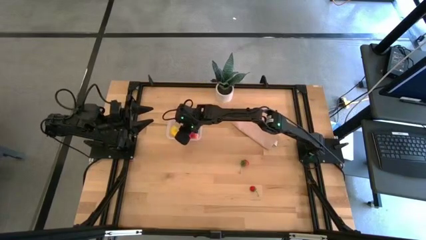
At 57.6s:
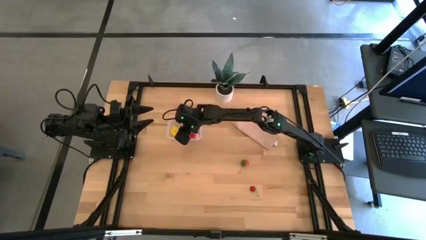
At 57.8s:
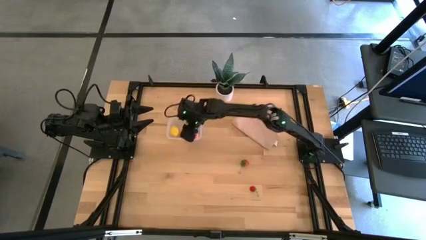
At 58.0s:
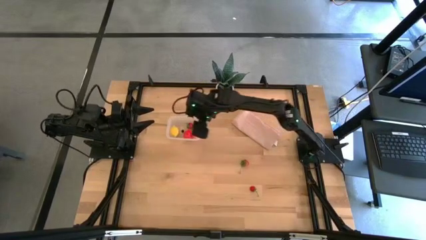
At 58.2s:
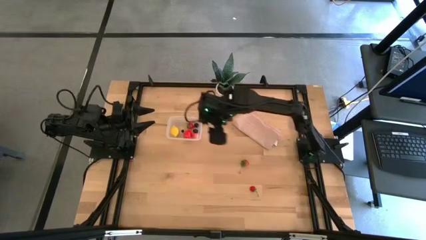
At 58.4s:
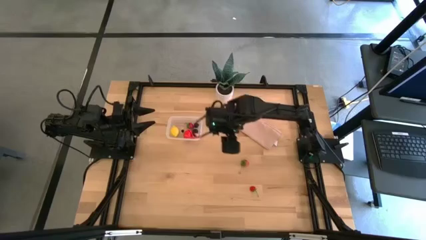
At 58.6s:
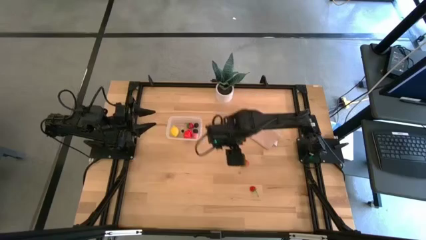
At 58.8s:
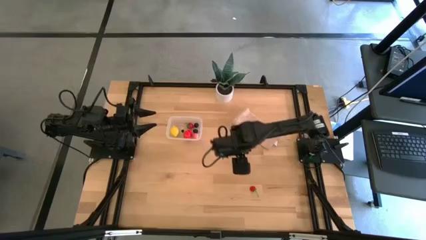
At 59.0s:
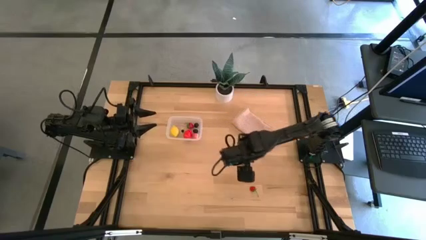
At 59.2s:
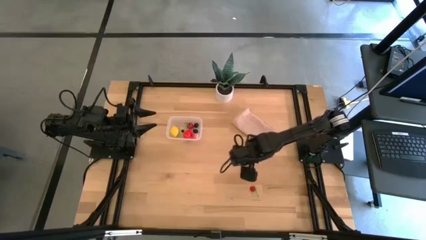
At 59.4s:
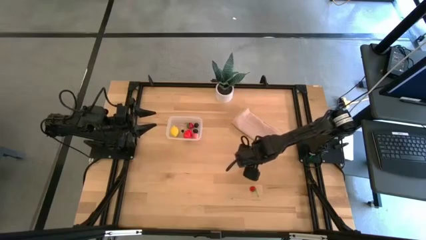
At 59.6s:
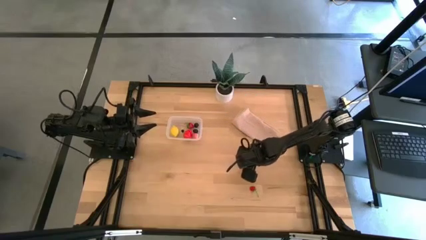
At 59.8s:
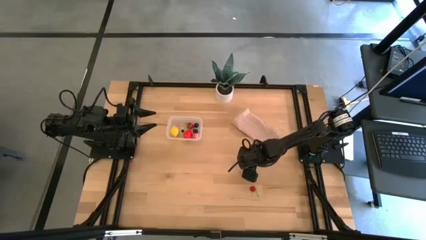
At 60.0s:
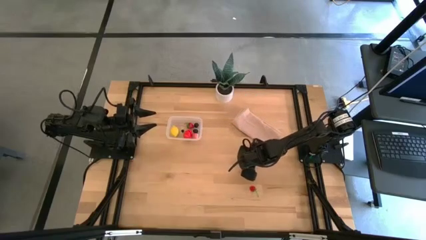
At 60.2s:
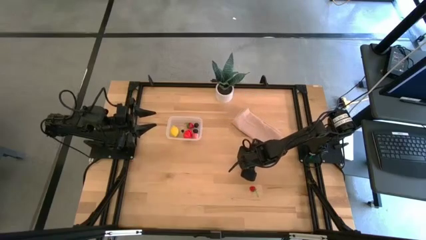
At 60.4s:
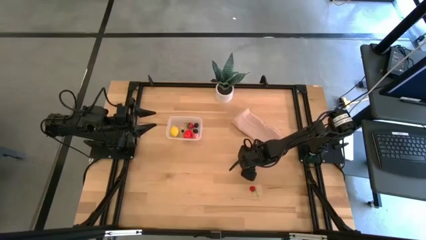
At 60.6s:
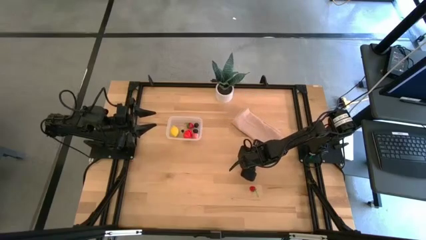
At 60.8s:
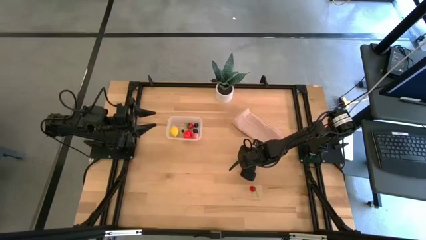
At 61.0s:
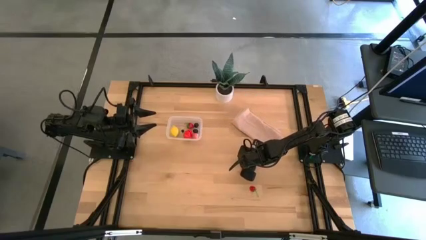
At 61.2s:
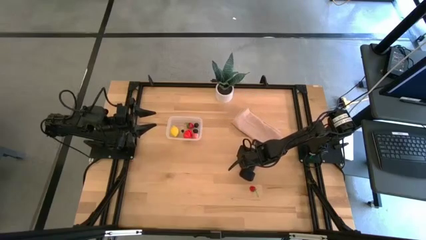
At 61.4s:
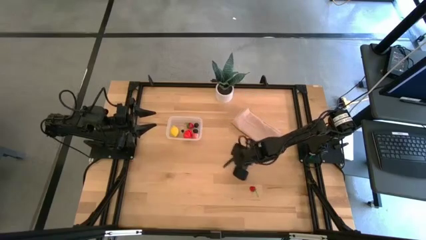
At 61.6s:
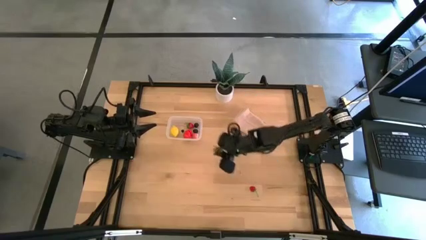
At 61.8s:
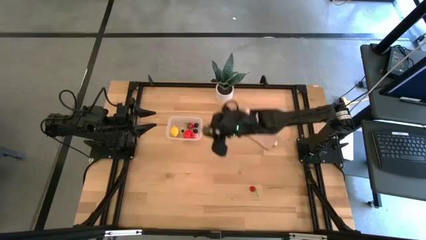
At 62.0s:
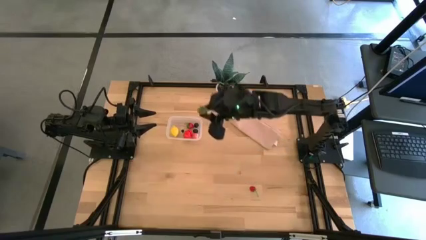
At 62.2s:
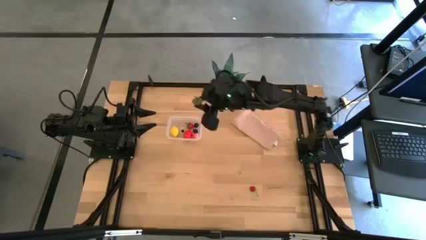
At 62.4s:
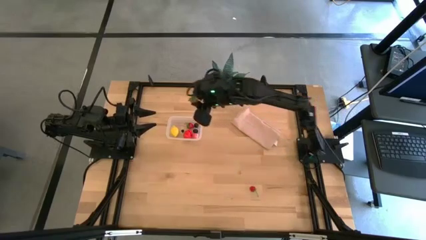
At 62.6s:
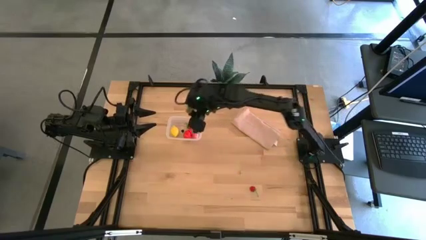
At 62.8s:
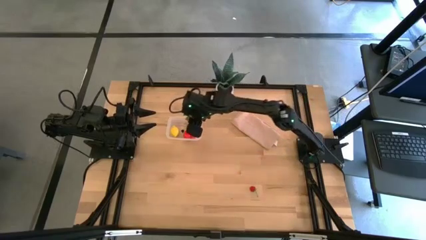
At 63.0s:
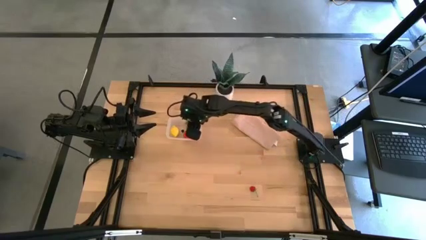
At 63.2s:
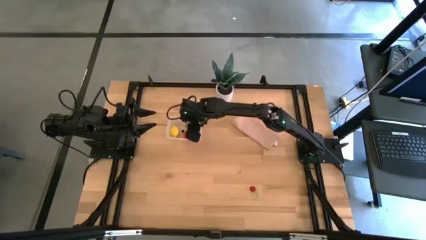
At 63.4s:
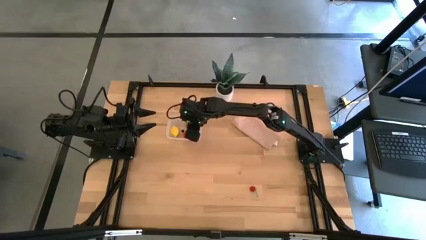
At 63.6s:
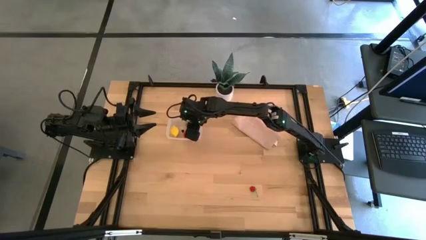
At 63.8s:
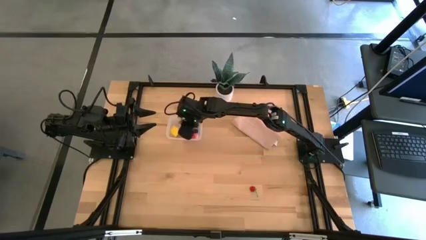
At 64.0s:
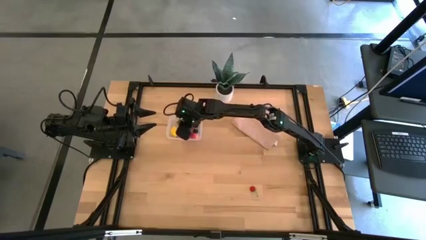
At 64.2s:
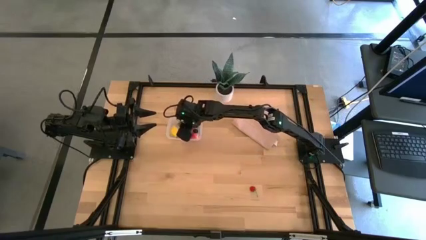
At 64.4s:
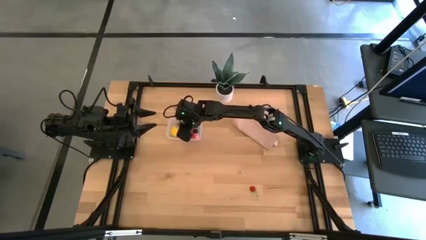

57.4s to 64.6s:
Task: Pick and placing Produce into tupperware
Put the red strawberry into the transparent container

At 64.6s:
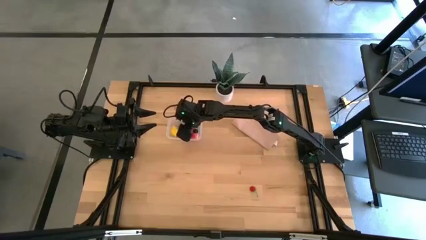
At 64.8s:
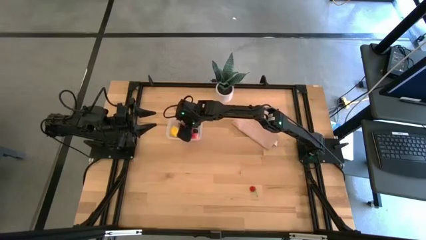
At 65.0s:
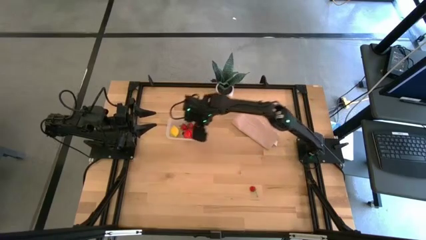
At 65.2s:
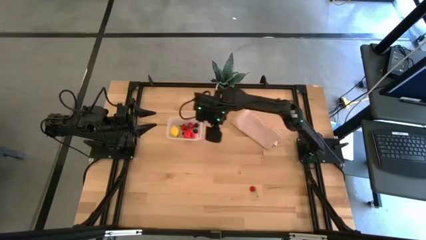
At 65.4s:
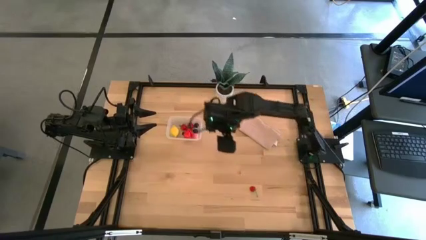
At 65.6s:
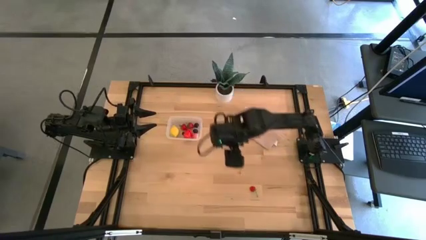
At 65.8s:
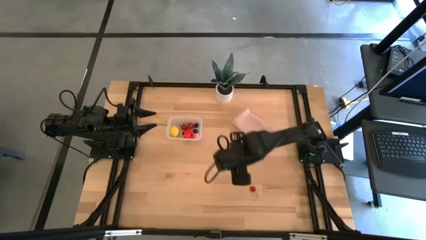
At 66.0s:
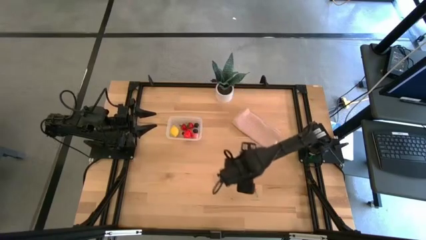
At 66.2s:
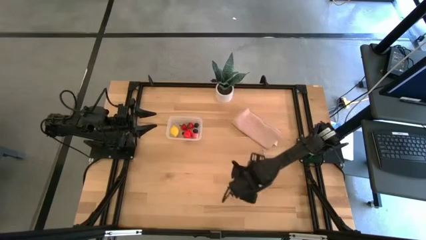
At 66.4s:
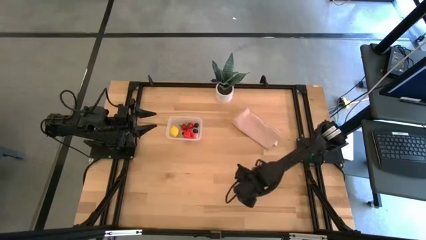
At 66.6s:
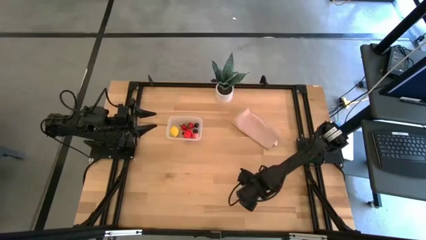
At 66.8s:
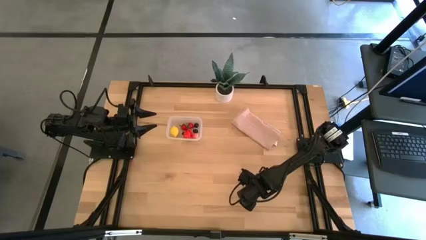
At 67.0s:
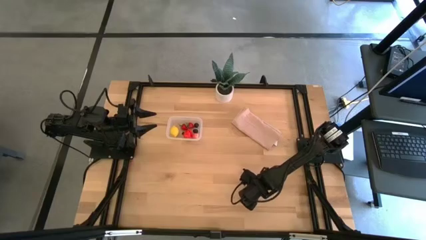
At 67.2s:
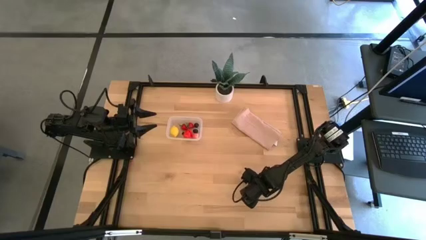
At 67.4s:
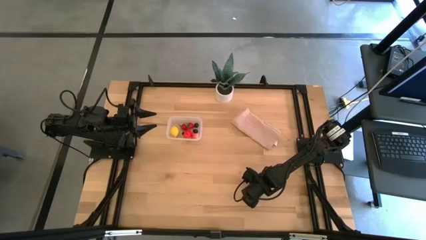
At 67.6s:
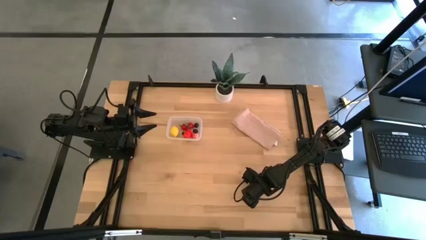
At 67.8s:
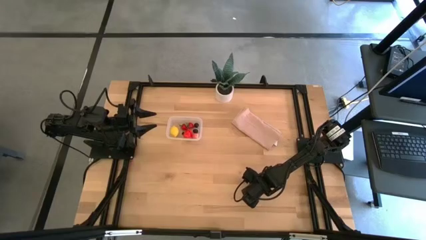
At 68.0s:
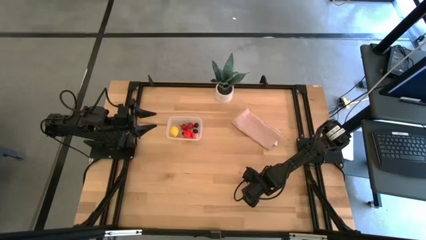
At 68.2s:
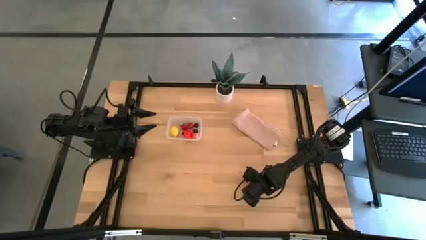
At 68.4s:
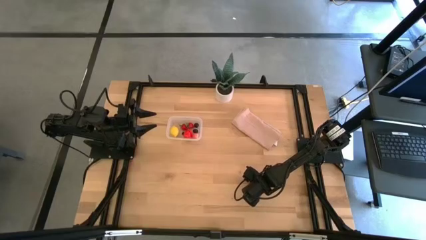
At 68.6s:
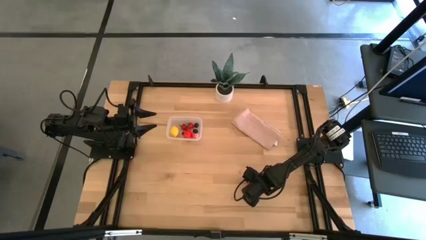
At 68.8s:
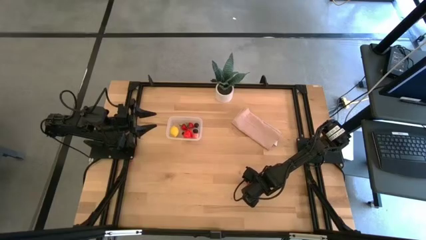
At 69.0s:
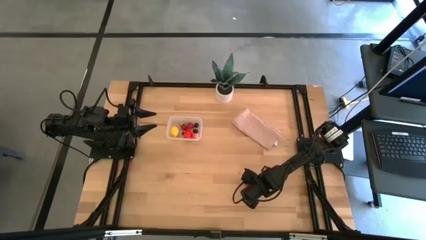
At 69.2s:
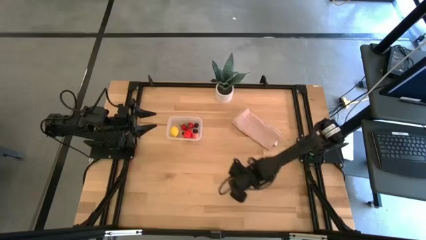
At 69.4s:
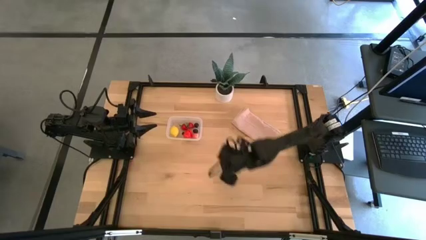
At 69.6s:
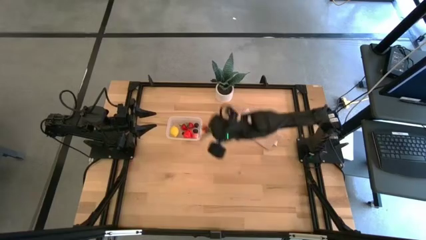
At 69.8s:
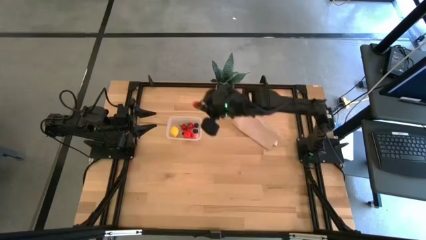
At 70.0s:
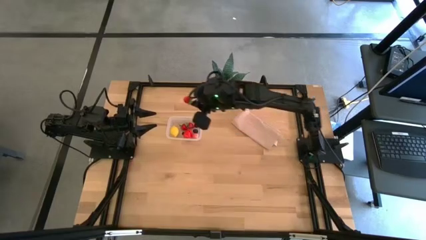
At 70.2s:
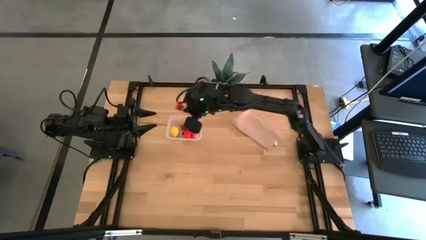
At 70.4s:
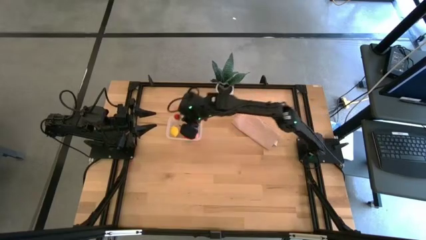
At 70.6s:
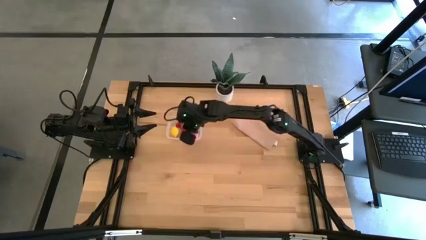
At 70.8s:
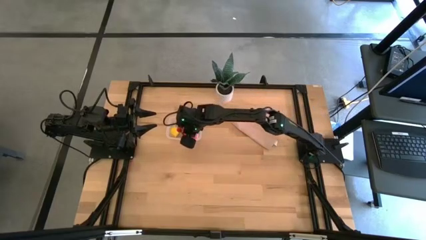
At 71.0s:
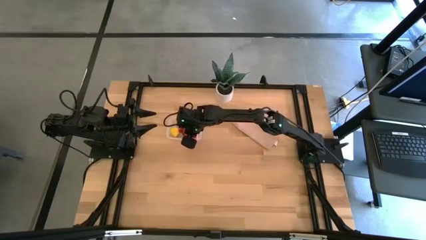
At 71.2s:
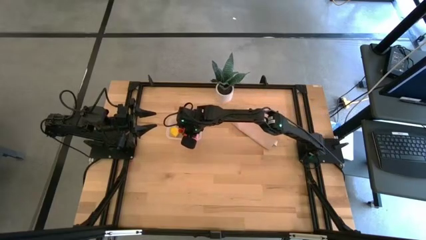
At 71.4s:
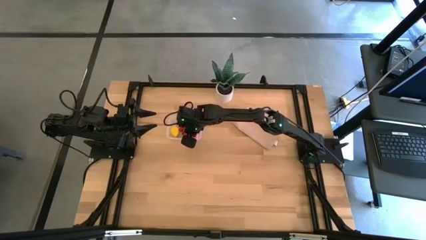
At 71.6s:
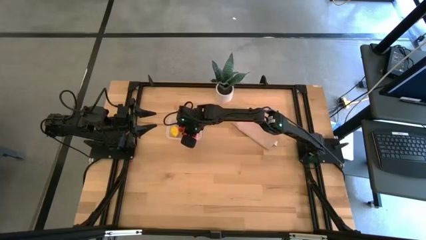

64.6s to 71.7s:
Put the red strawberry into the transparent container

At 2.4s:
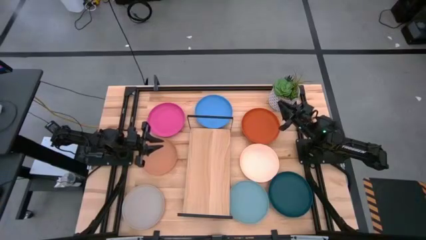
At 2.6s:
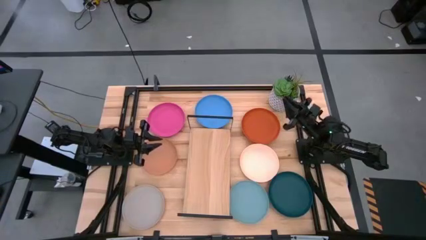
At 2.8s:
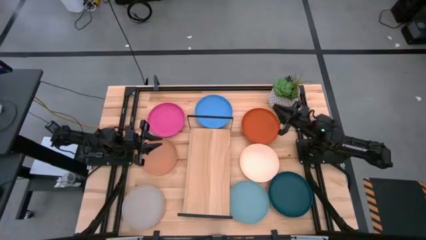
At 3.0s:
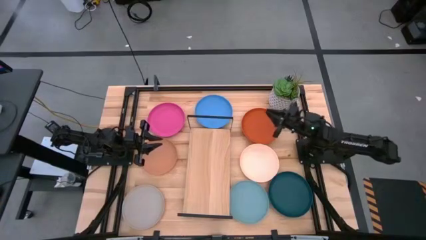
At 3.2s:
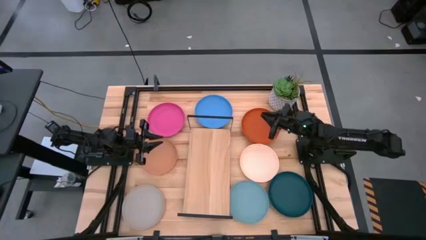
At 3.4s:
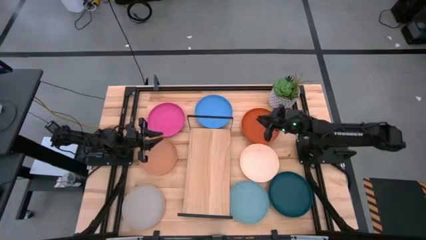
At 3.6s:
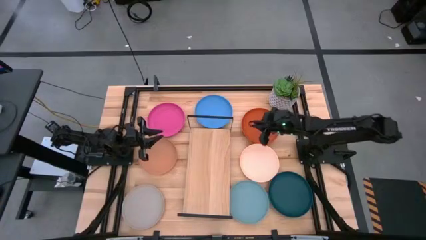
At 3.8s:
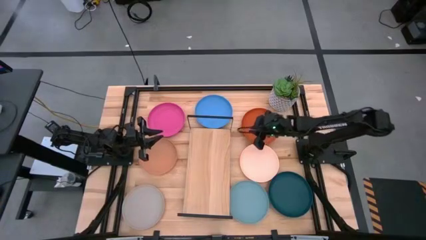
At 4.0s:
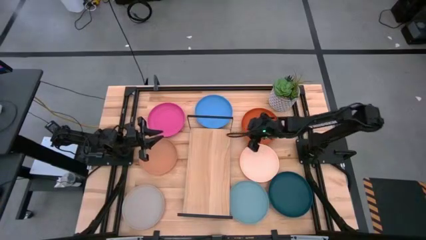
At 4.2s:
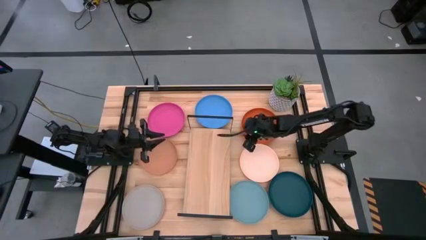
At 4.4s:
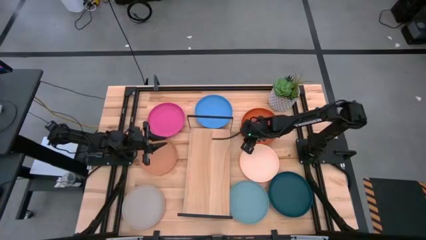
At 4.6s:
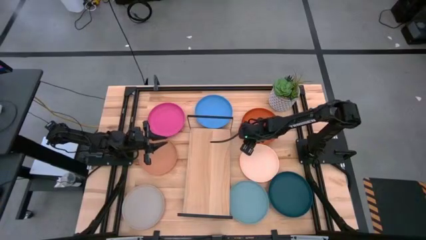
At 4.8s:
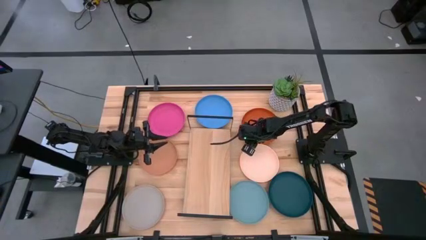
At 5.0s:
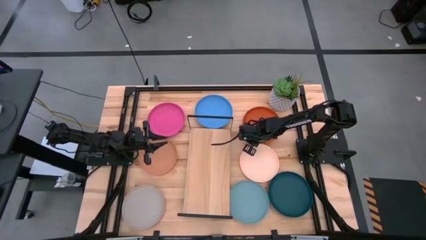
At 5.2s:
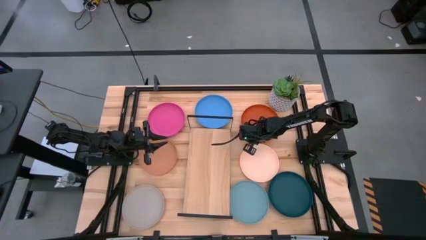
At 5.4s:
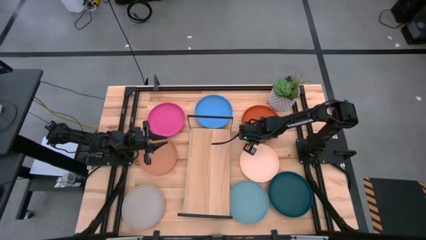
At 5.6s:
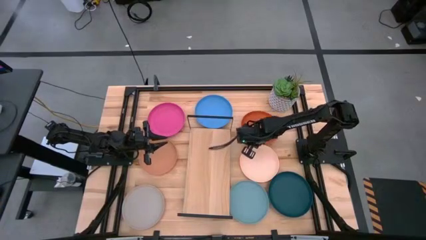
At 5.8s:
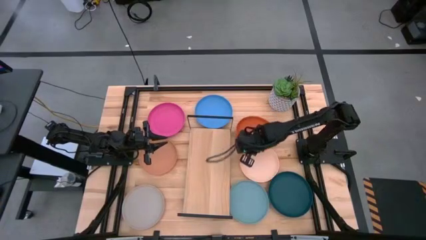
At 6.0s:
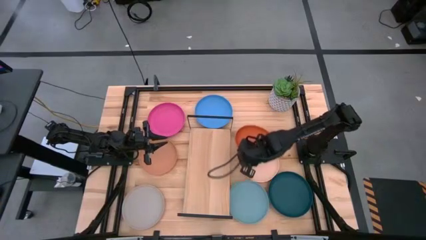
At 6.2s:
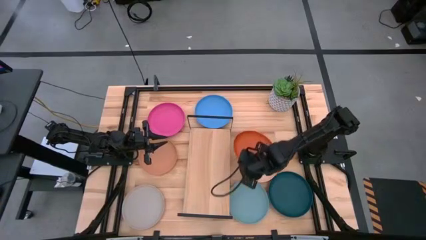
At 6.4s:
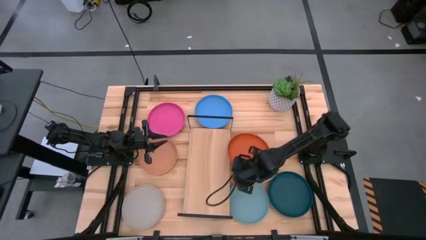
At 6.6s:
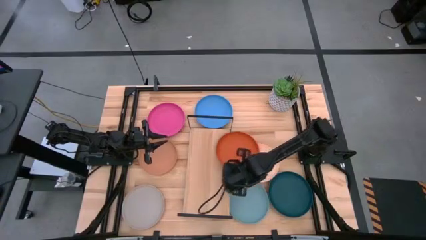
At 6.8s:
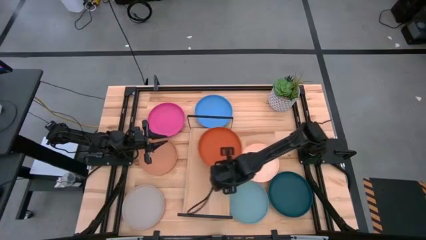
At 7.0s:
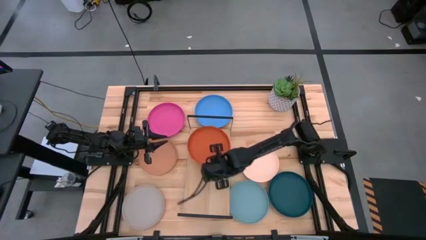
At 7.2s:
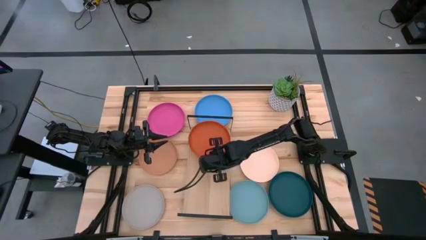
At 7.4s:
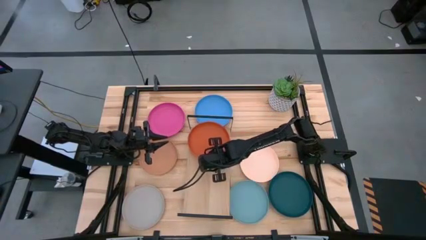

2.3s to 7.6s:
Task: Place and stack plates onto a shelf
Put the orange plate on the shelf
